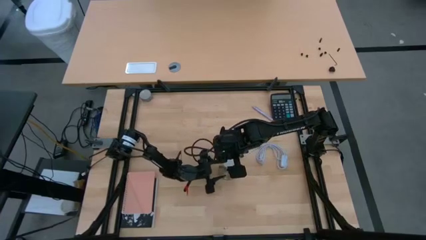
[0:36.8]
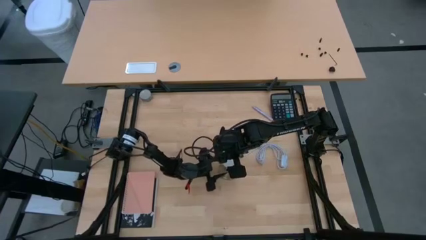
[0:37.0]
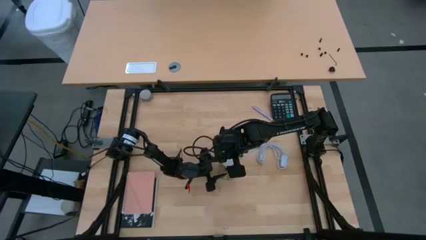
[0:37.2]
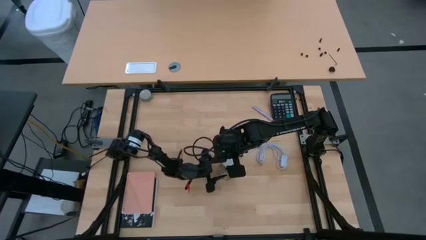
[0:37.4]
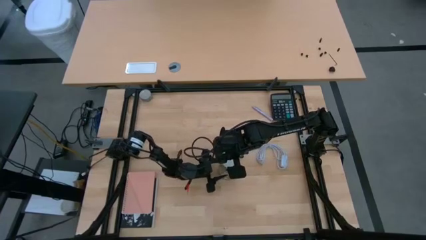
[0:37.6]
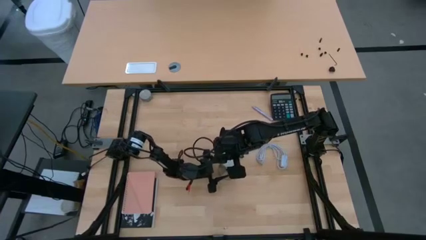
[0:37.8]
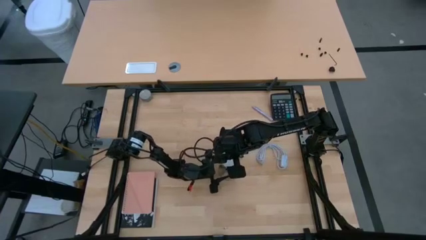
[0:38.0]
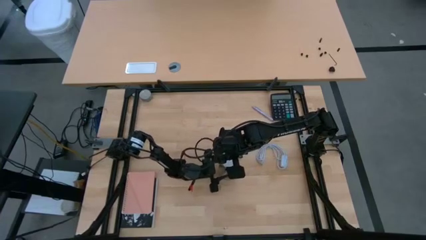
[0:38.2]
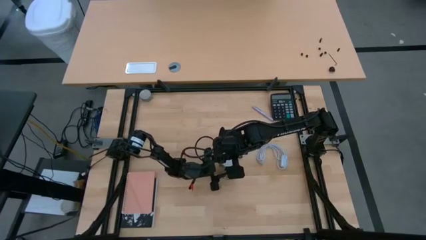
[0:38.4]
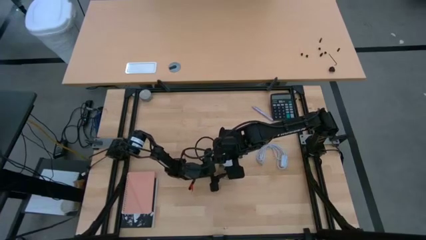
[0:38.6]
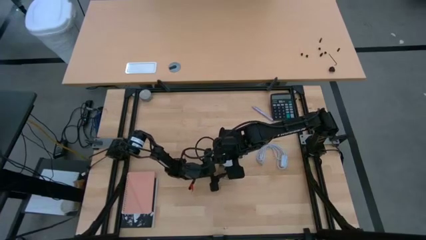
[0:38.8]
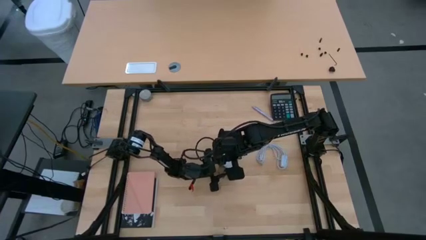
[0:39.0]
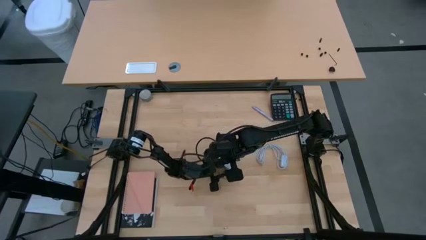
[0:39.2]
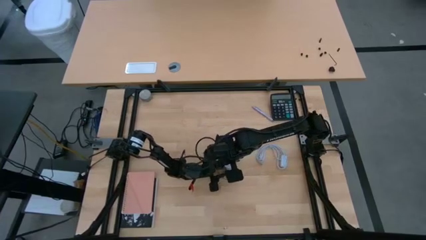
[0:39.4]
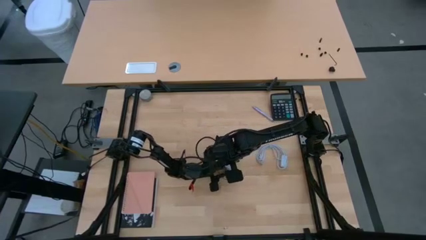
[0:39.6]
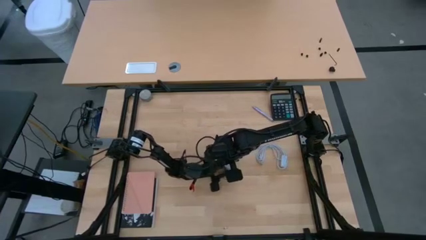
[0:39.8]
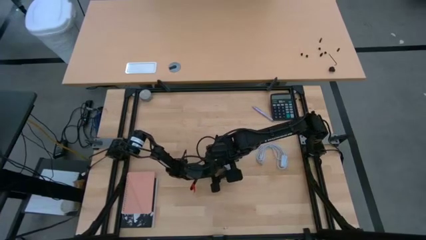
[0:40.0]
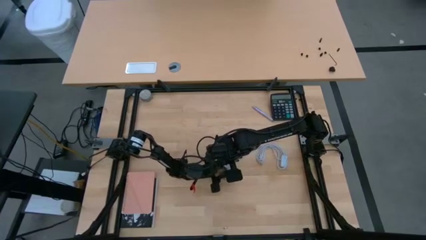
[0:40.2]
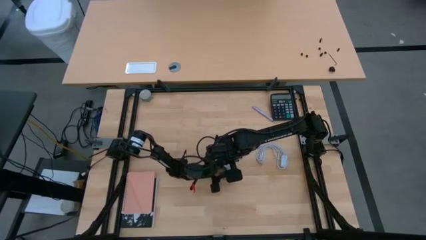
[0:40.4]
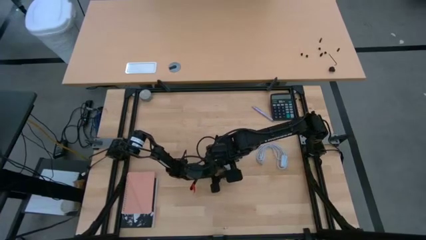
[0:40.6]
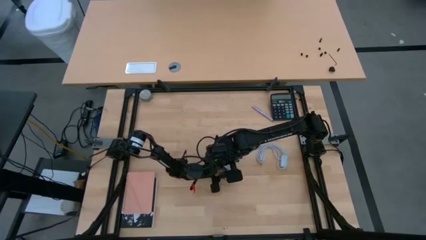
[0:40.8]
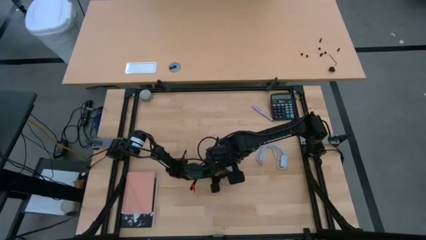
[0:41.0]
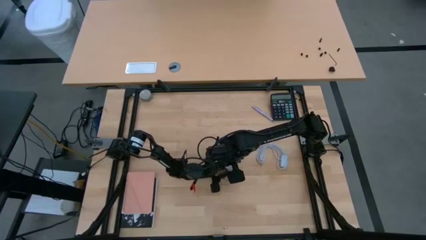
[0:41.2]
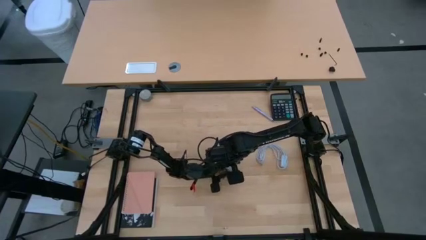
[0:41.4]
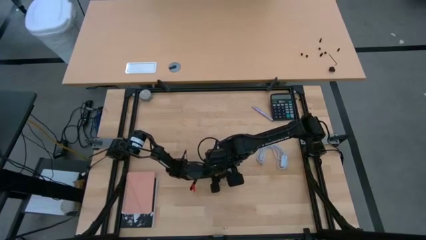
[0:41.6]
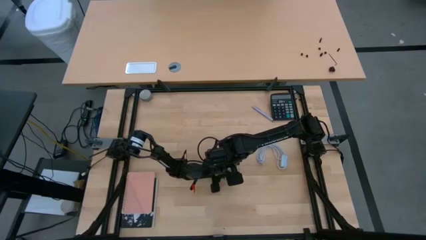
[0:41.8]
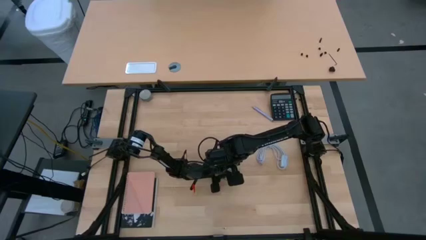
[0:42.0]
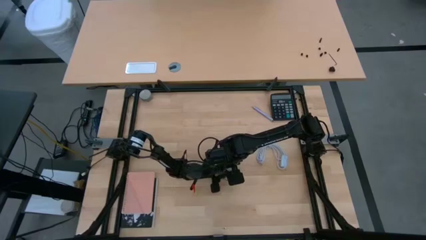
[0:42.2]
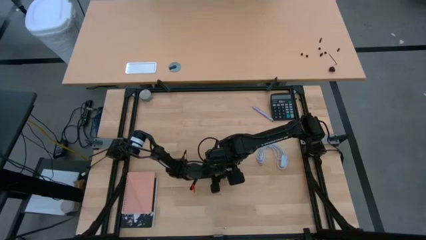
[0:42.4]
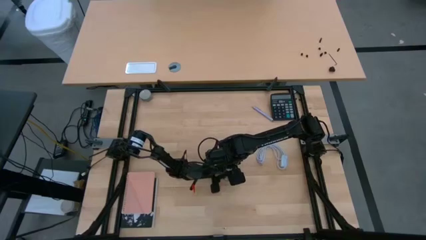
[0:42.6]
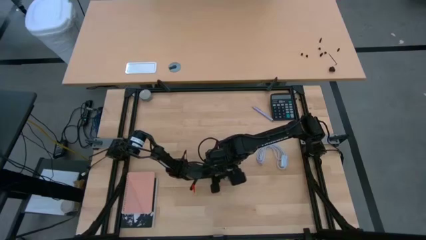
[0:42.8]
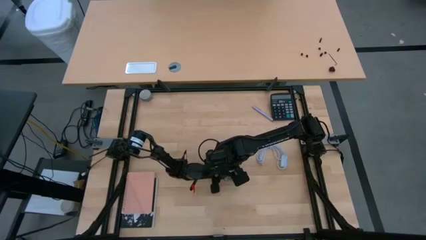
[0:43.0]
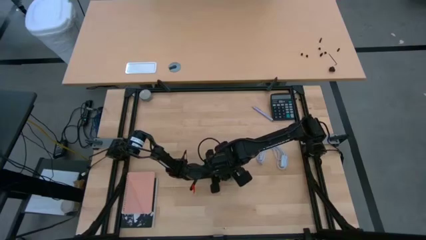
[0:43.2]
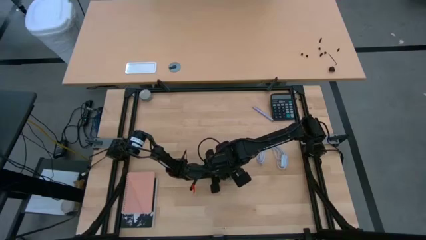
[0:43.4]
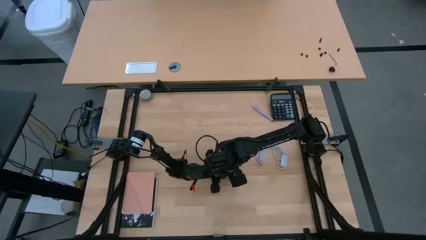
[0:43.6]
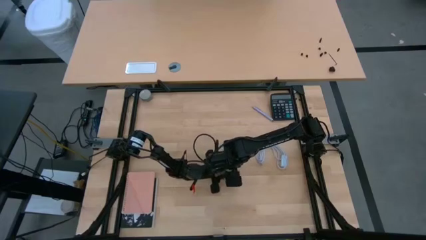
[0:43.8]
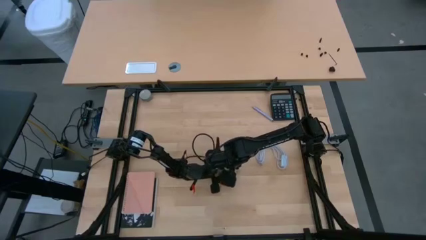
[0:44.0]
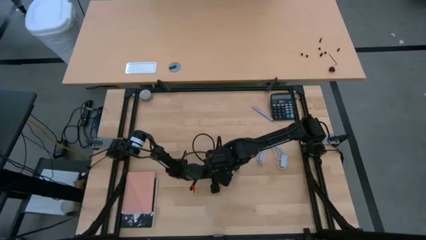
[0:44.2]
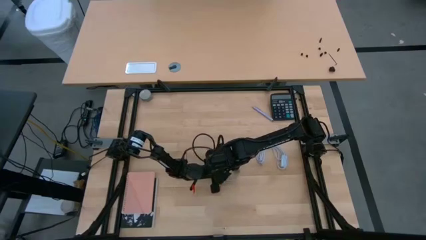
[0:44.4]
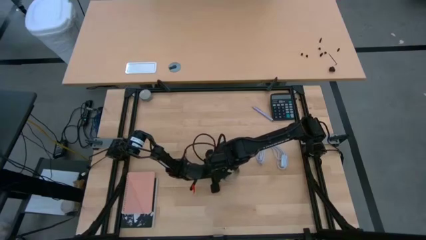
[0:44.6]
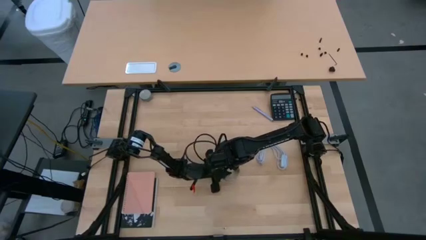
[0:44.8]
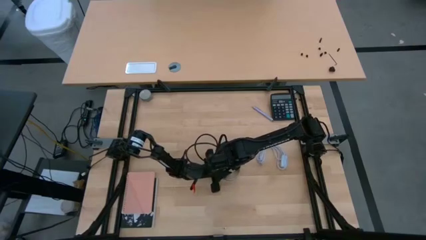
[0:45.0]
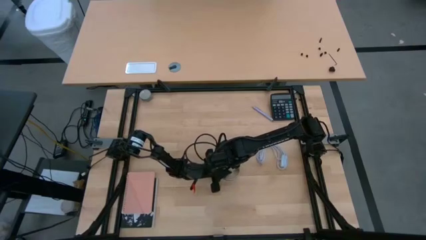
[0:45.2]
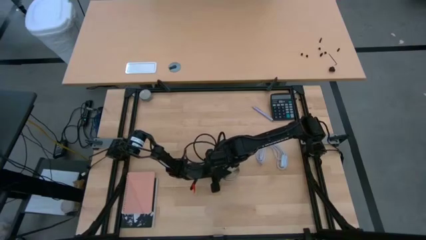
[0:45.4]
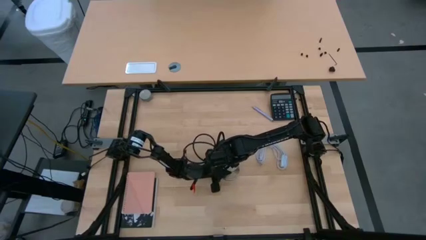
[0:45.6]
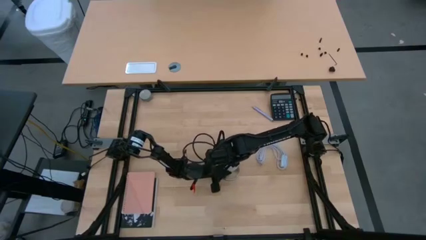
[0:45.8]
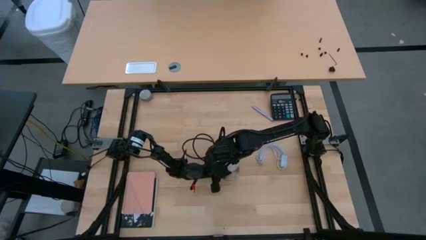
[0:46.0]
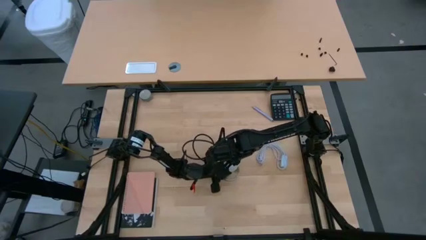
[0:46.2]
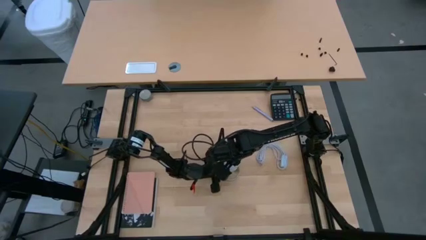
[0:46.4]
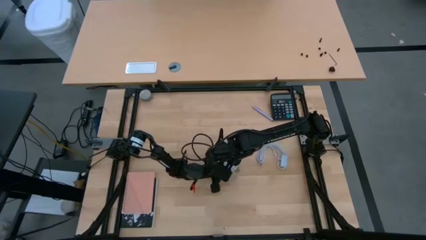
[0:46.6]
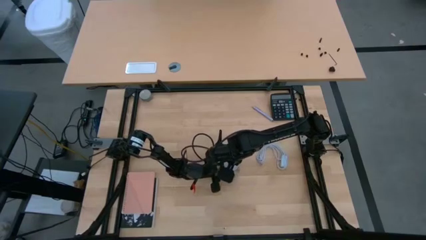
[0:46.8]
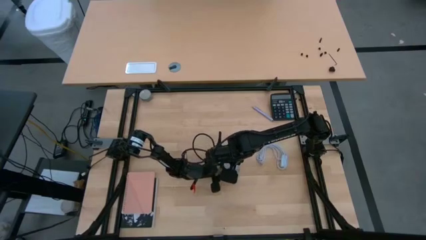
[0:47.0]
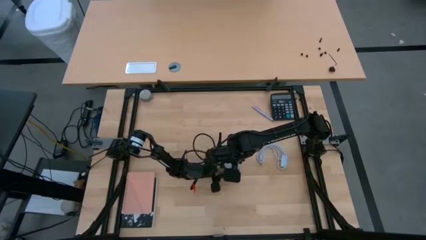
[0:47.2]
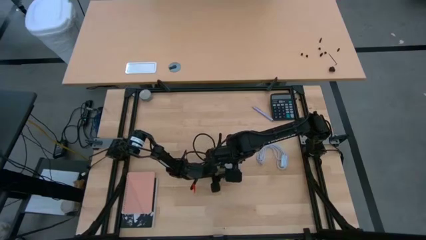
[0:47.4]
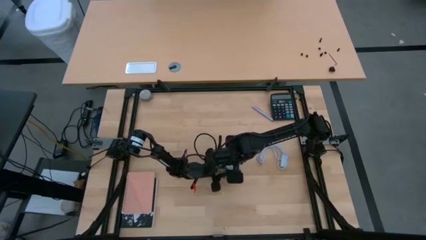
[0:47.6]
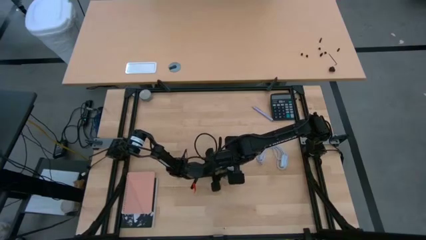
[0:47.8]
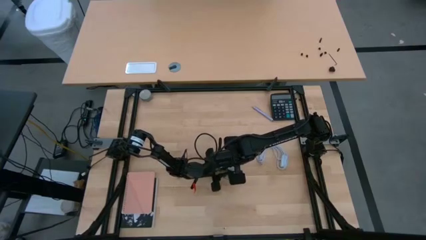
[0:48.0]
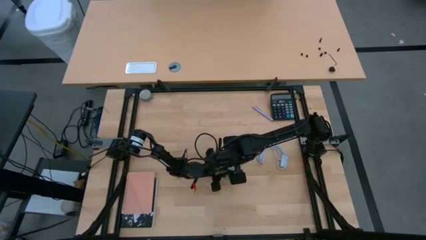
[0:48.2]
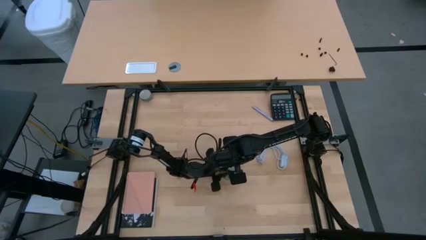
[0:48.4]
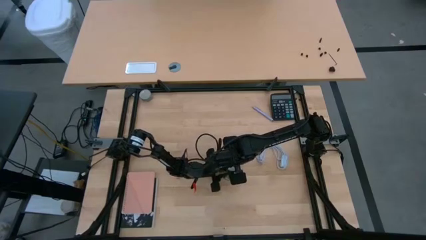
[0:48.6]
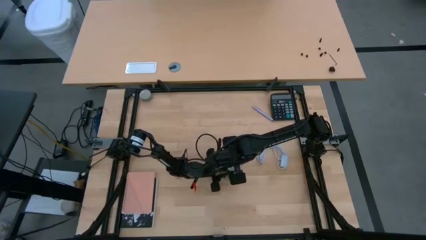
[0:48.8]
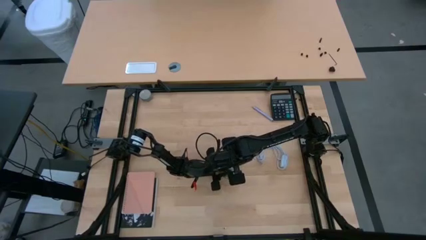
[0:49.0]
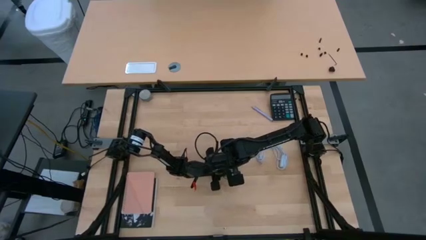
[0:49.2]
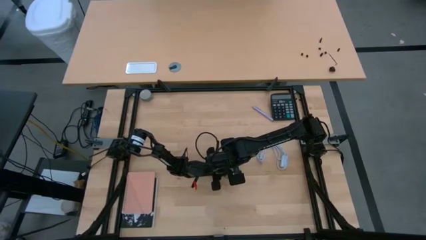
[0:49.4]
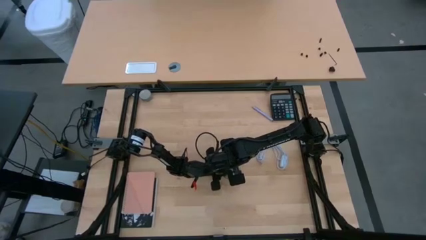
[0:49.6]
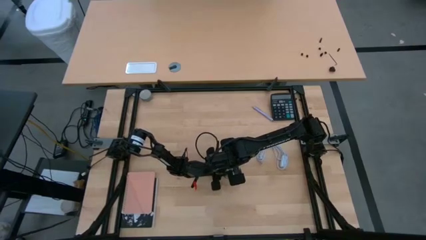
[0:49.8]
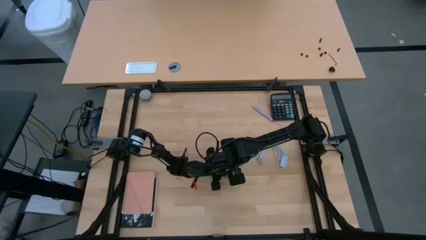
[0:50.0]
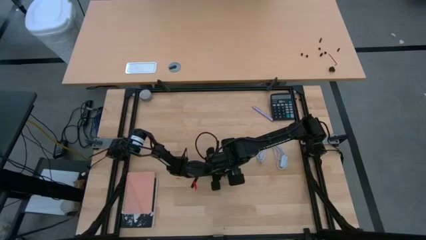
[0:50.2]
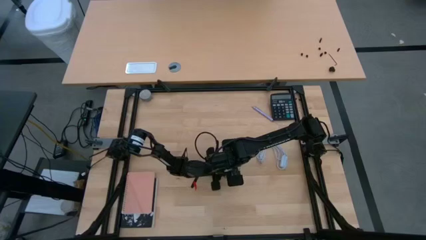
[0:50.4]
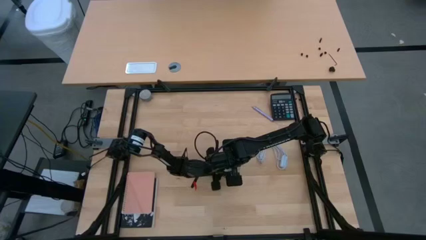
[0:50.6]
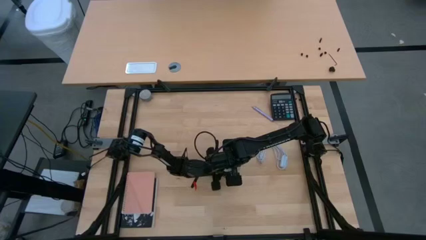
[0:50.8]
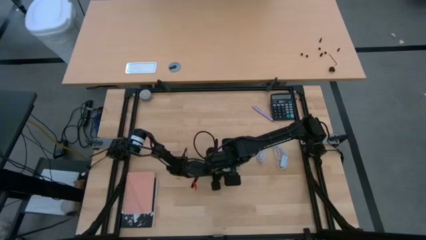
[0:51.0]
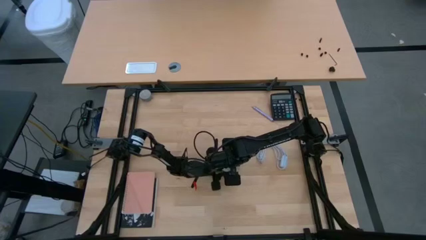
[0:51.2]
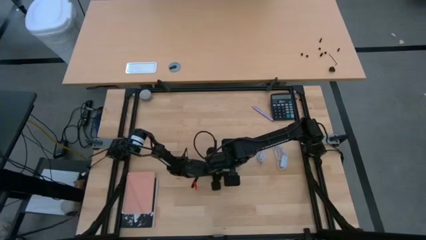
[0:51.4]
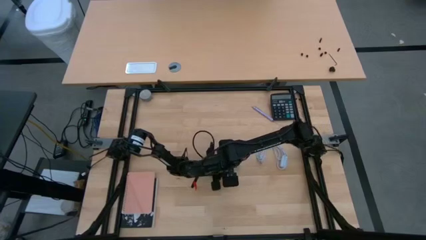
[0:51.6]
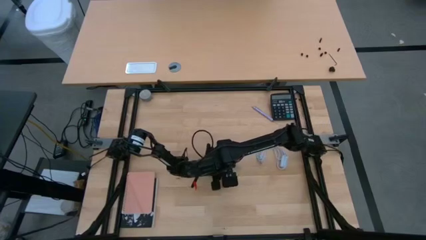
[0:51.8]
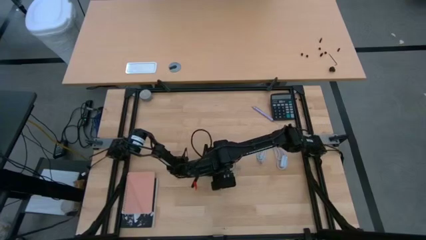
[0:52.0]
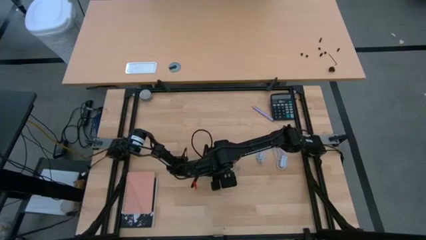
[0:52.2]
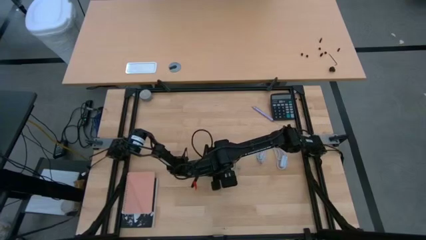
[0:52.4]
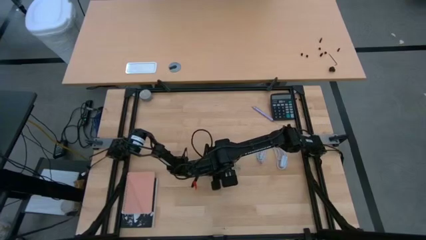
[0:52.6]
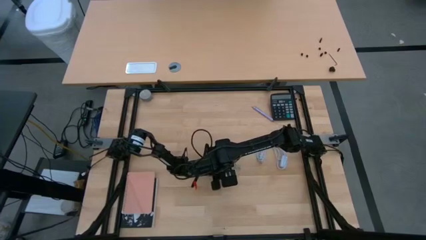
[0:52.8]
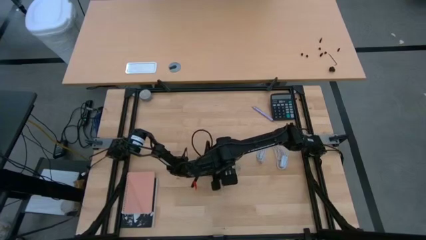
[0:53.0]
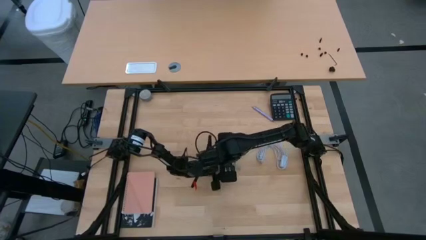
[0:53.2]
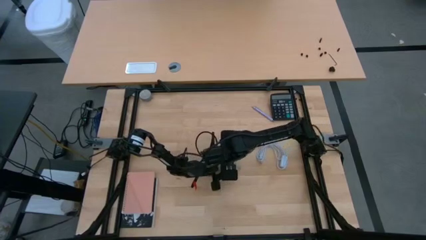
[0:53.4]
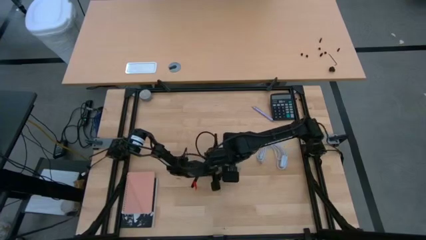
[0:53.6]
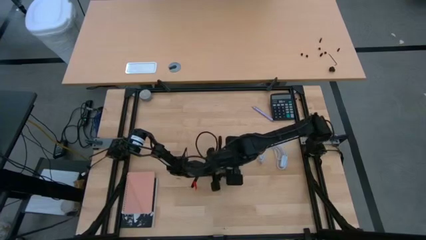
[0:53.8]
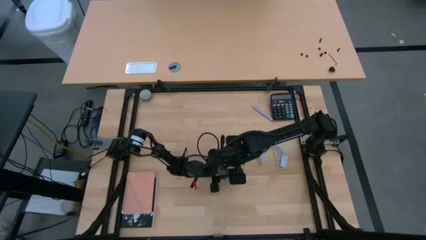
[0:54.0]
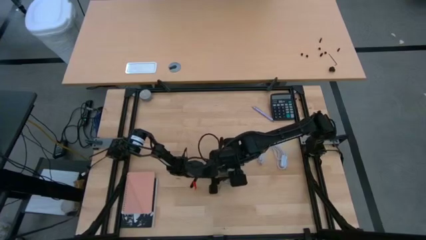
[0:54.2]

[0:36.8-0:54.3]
Task: Screw lightbulb
Insert the lightbulb on the lamp
